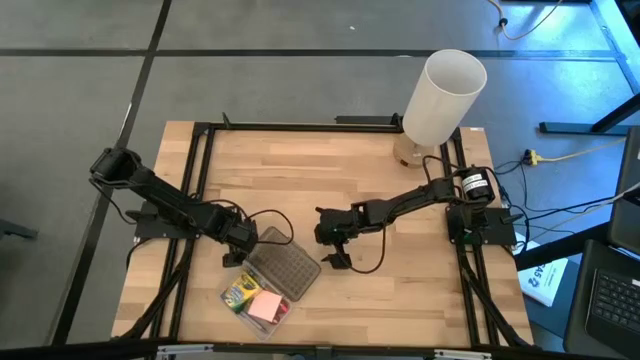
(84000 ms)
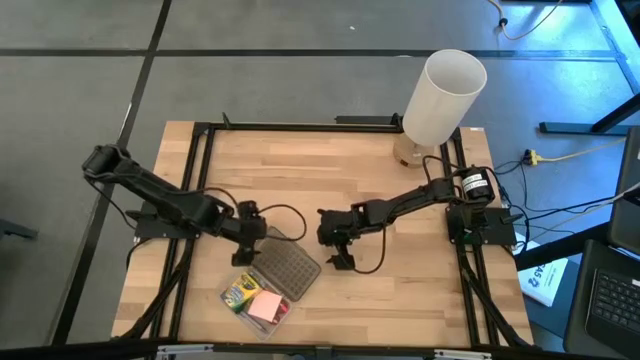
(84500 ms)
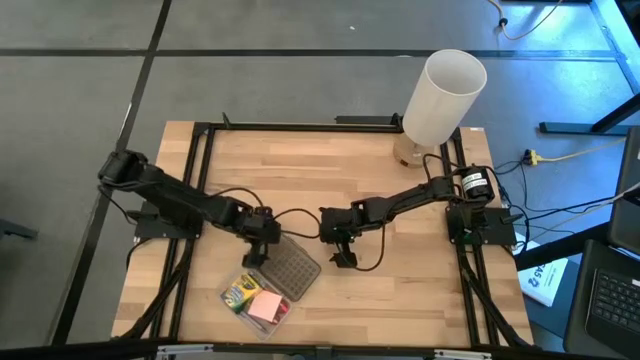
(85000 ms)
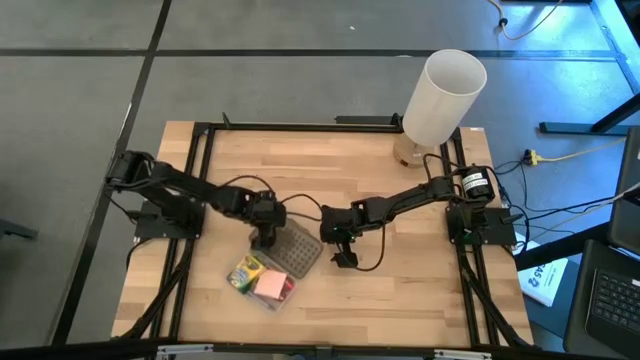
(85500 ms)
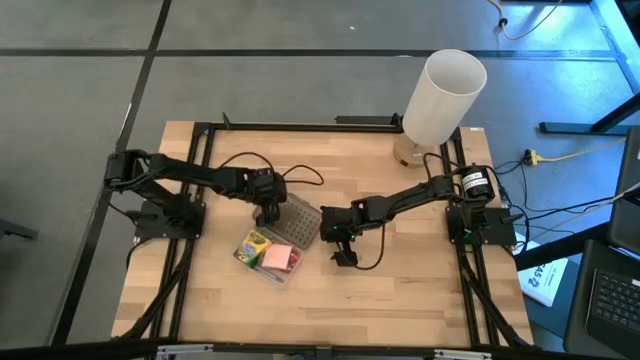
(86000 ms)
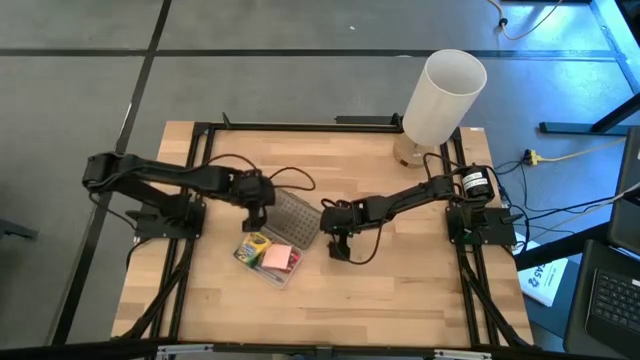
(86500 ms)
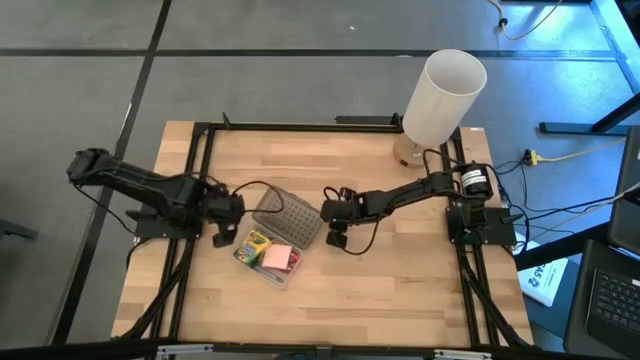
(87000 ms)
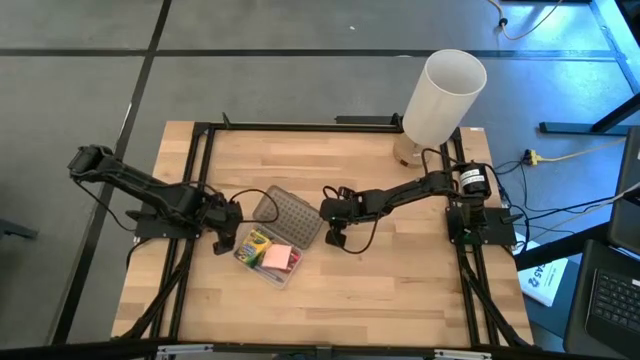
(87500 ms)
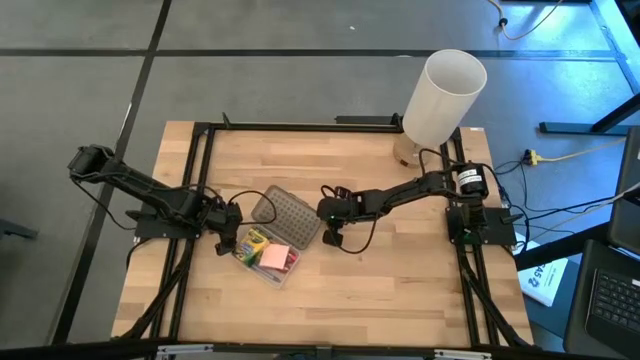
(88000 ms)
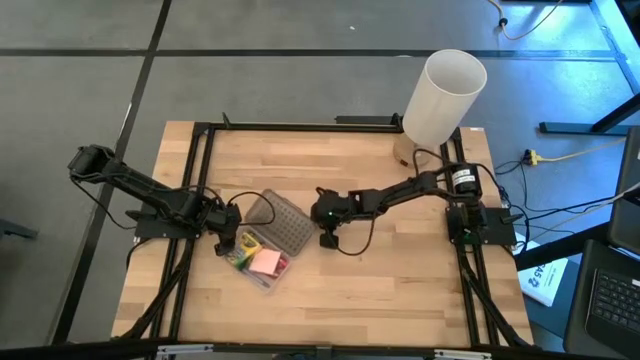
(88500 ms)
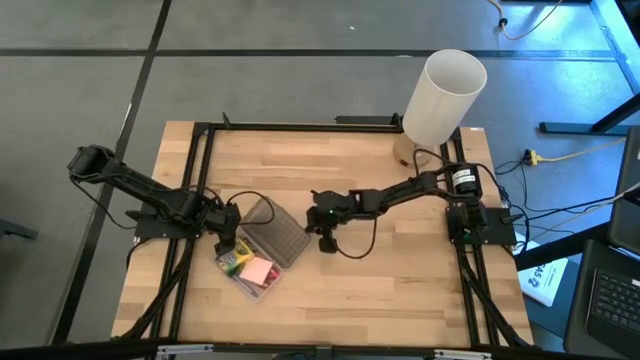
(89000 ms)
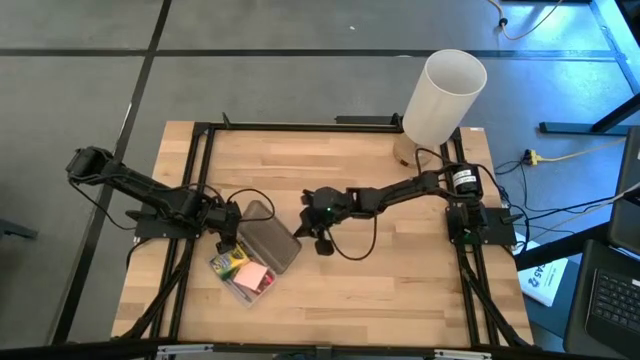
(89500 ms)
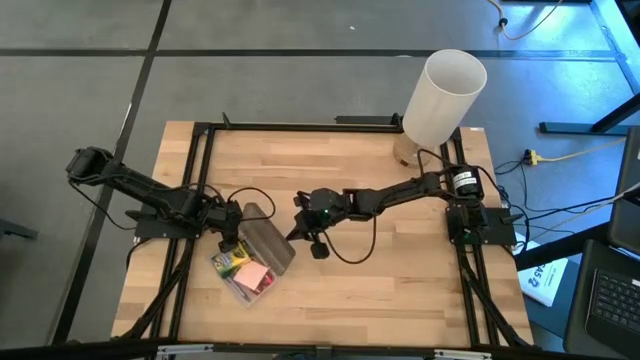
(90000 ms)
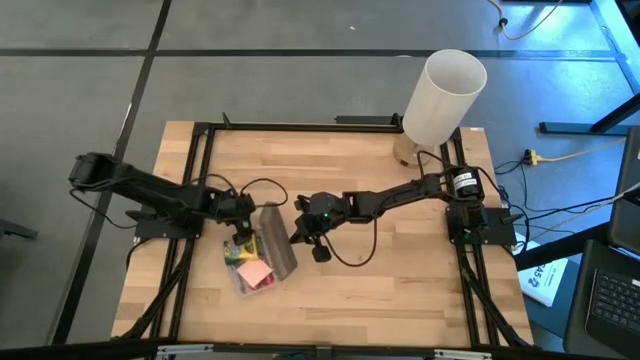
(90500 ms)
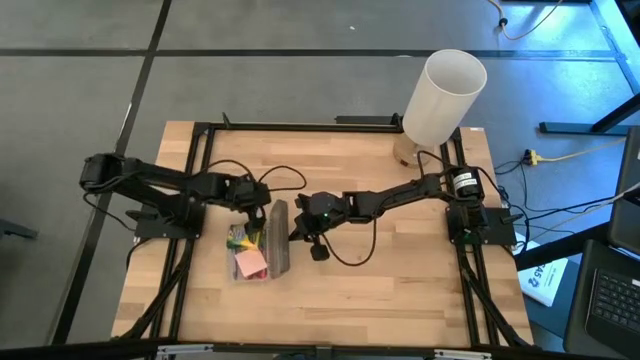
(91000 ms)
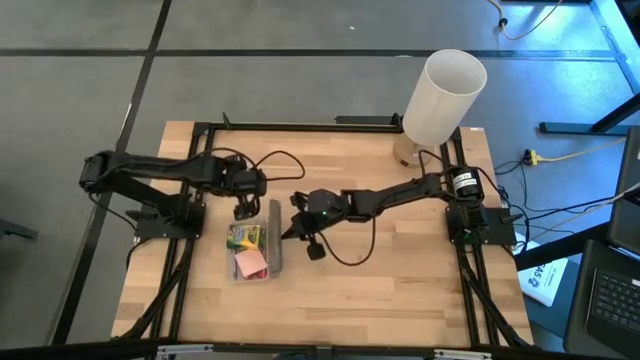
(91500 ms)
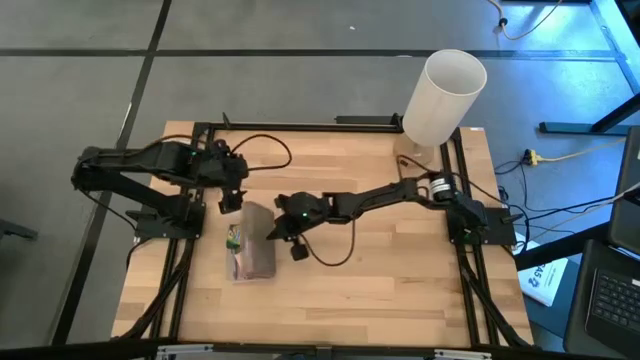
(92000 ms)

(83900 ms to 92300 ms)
Task: Pack school essentials
Close the black supply box

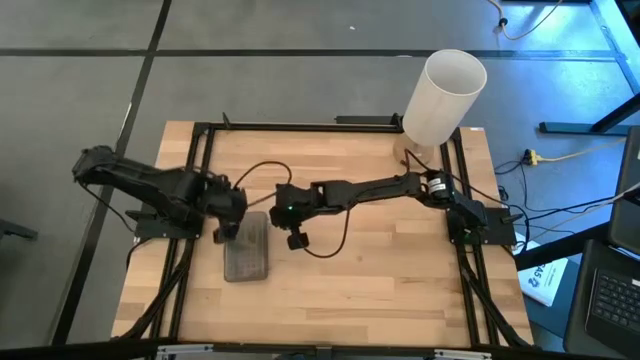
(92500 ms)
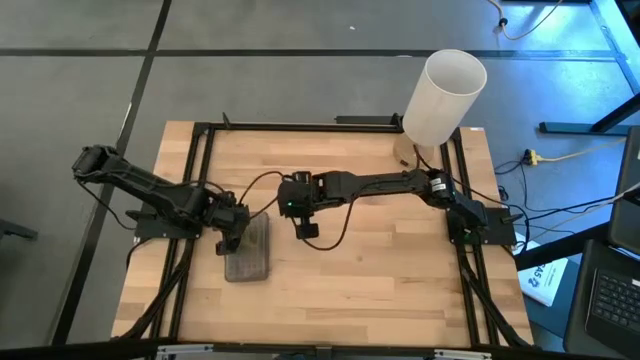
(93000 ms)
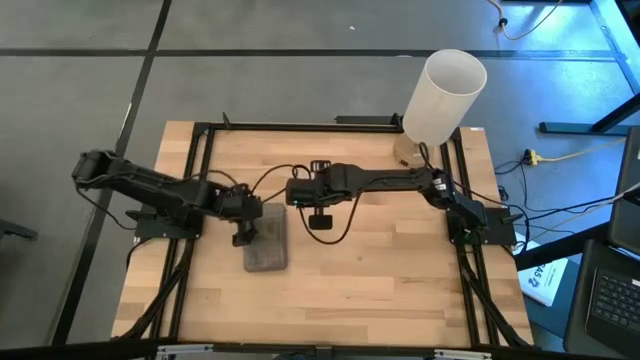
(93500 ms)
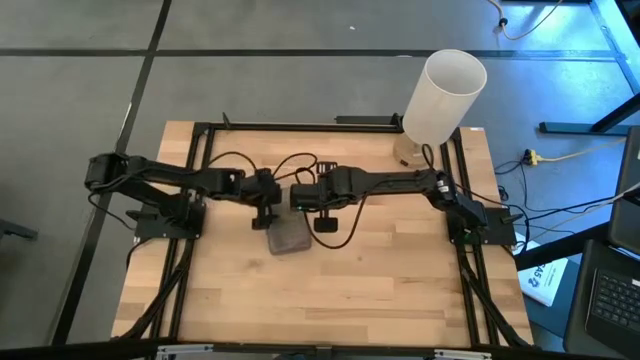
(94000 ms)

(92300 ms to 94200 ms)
Move the black supply box to the top center

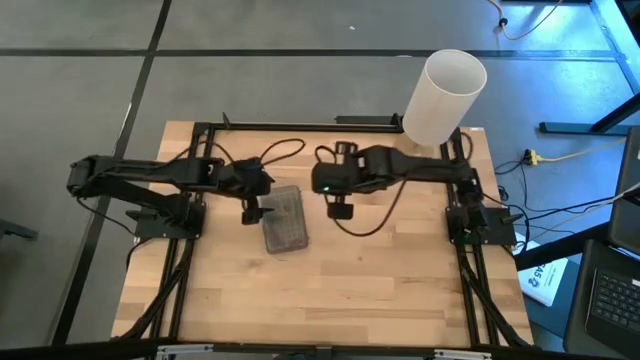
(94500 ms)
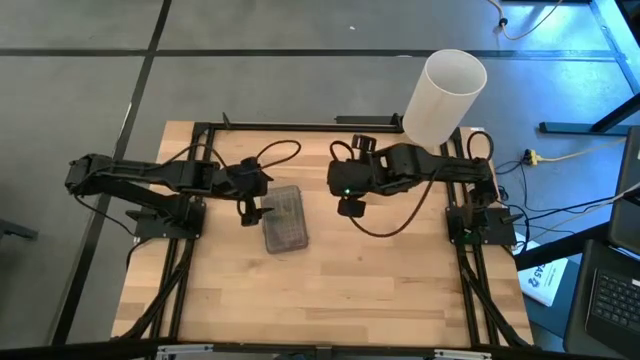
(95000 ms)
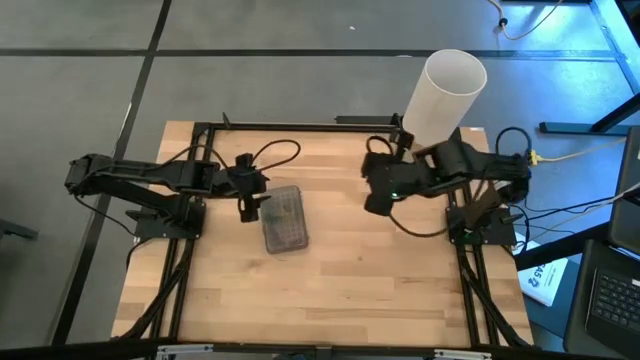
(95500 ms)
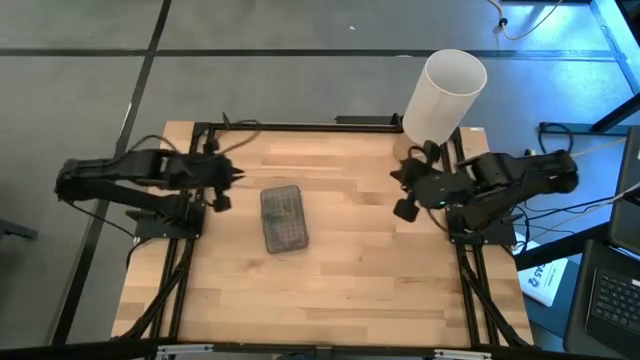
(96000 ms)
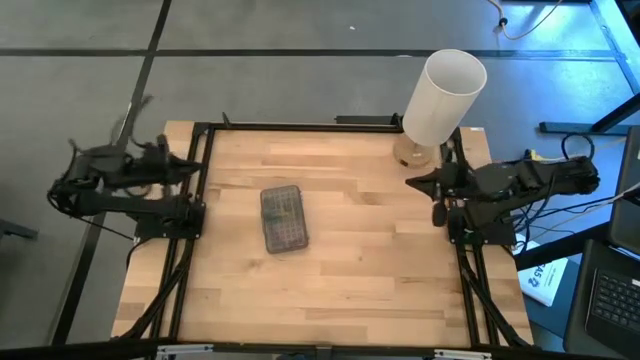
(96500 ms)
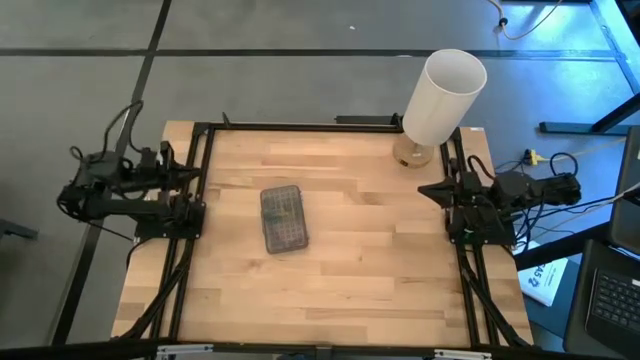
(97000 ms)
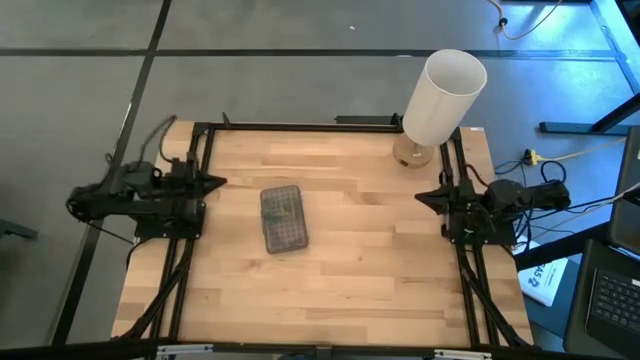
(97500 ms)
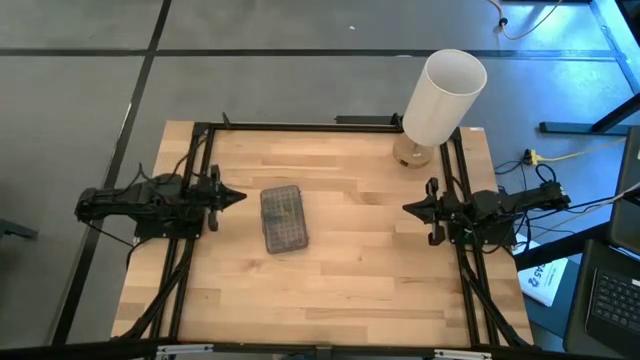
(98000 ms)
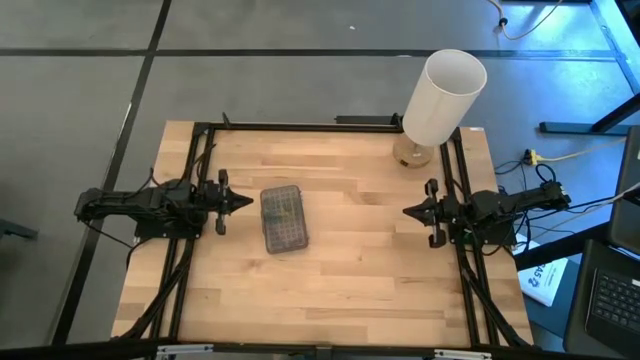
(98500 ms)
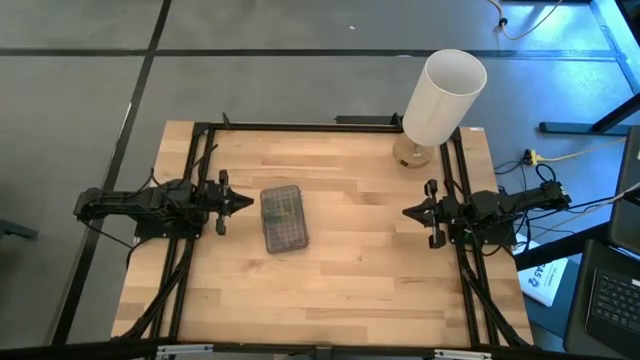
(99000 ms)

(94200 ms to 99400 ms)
Return to Home Position

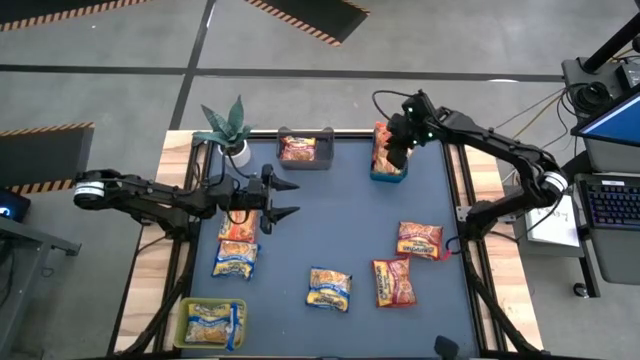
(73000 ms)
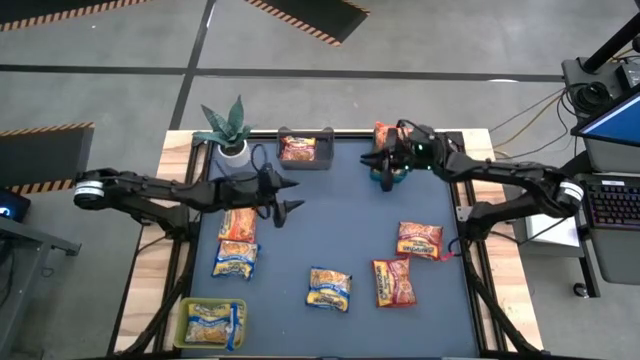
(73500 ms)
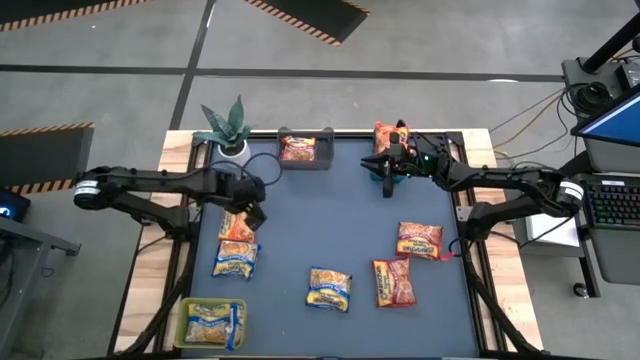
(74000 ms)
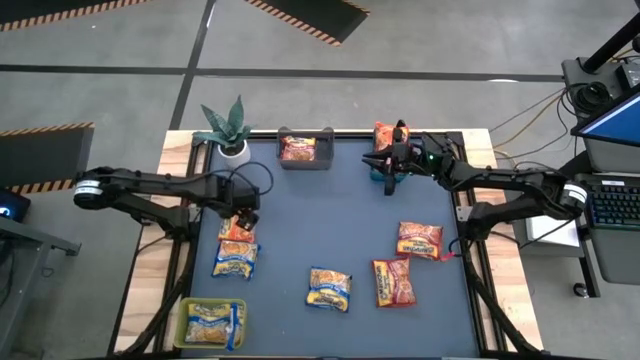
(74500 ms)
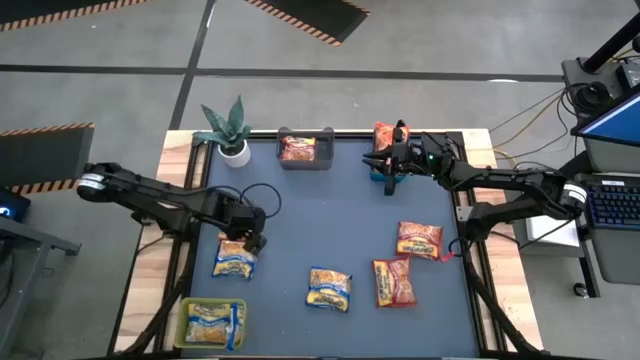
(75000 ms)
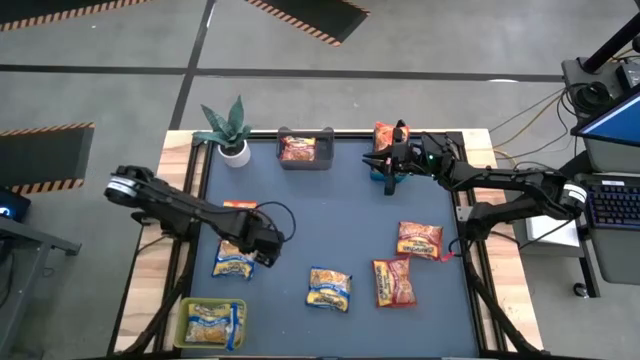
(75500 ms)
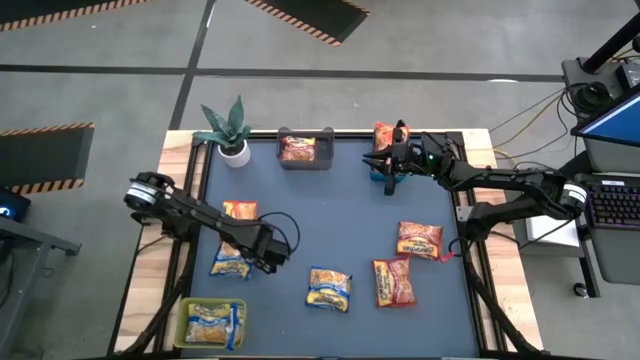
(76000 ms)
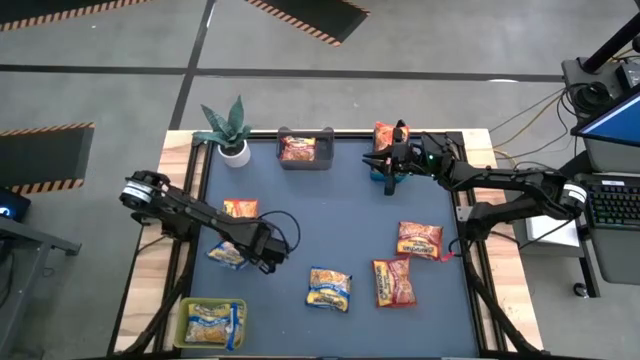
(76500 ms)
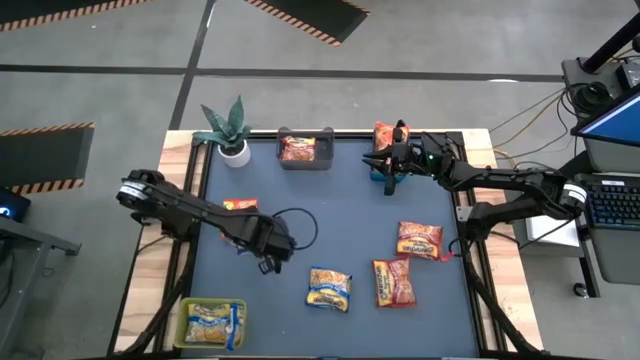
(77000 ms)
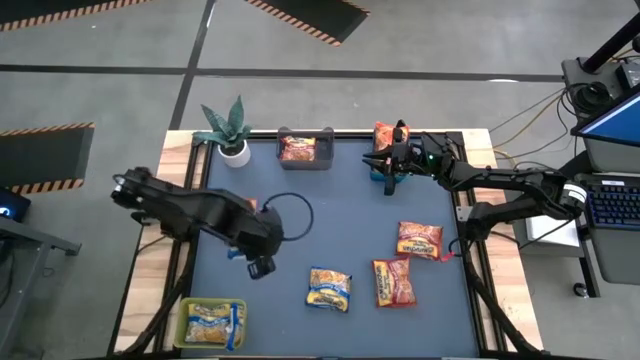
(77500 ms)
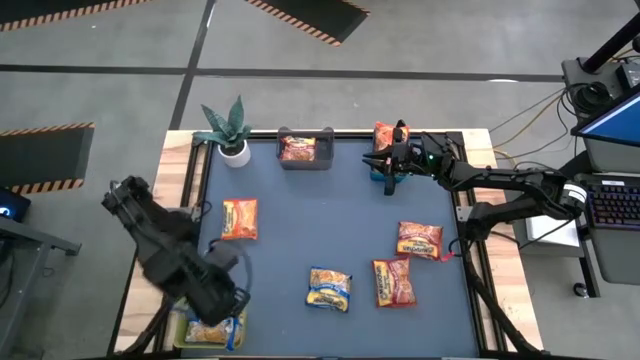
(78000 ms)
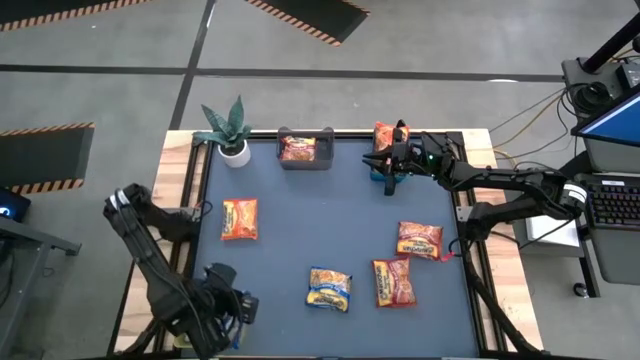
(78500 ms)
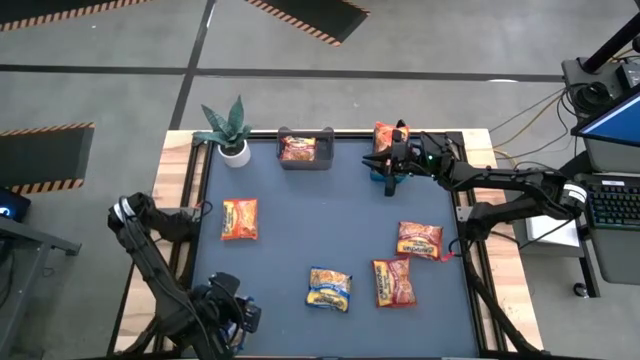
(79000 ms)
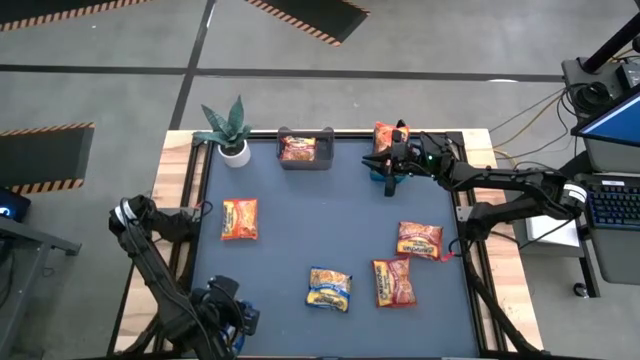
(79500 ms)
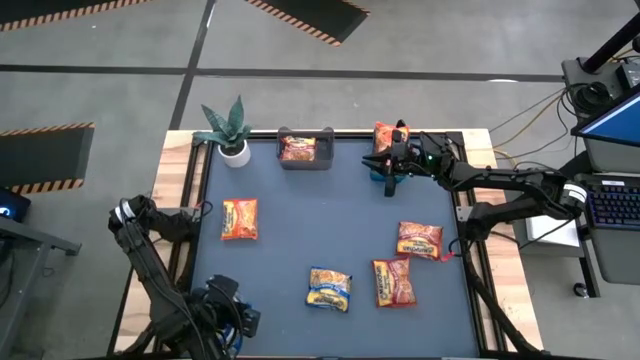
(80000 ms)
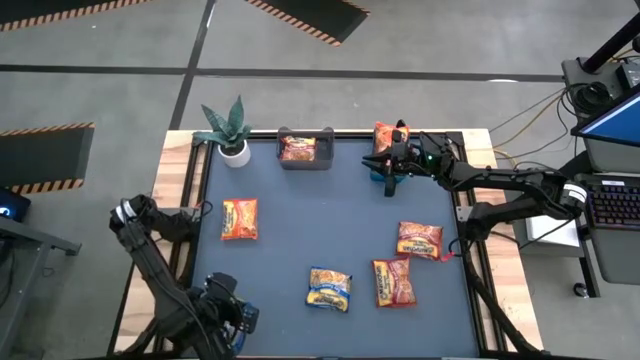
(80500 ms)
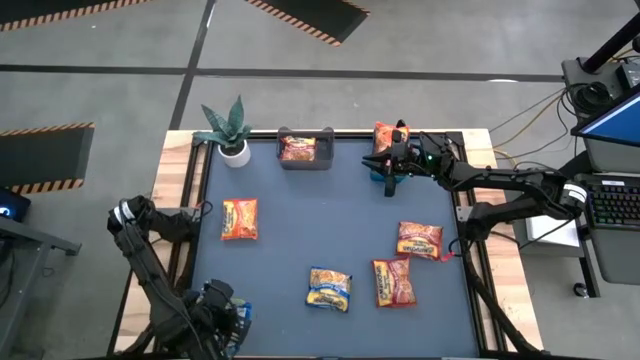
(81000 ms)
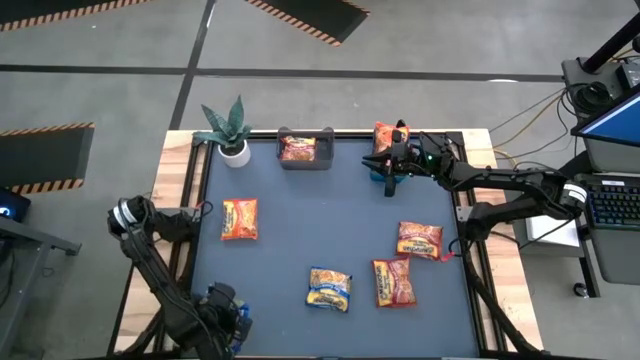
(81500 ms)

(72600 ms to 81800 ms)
Task: Sort Maruchan noodles
Put the blue noodle pack into the yellow bin
